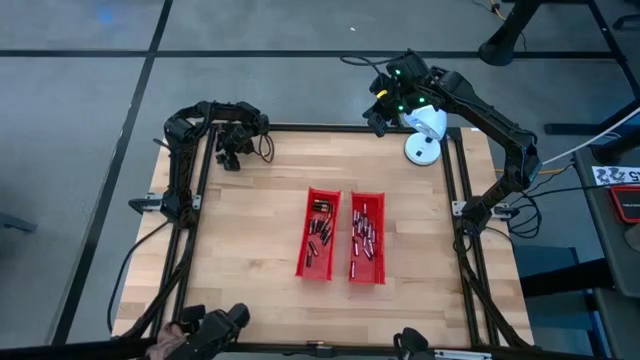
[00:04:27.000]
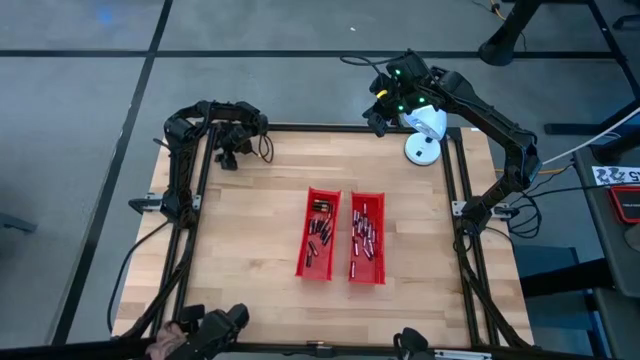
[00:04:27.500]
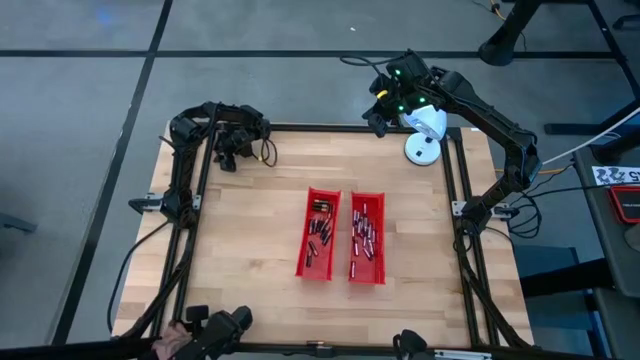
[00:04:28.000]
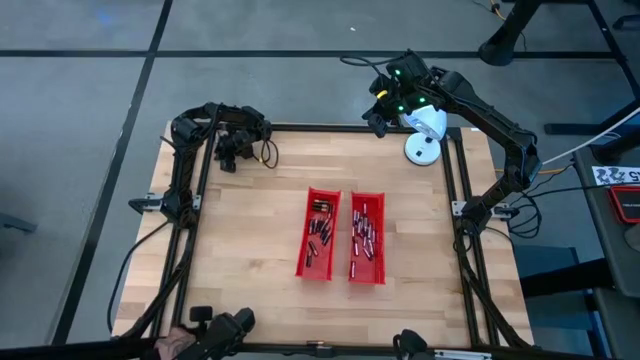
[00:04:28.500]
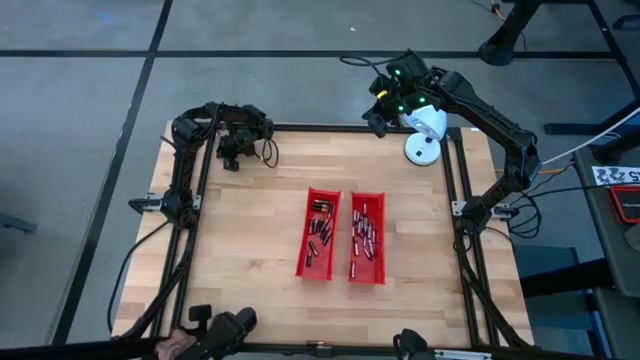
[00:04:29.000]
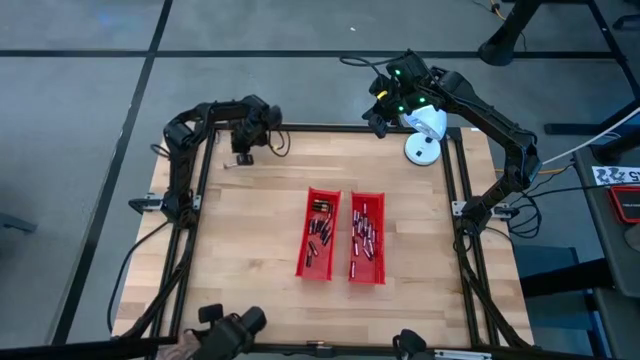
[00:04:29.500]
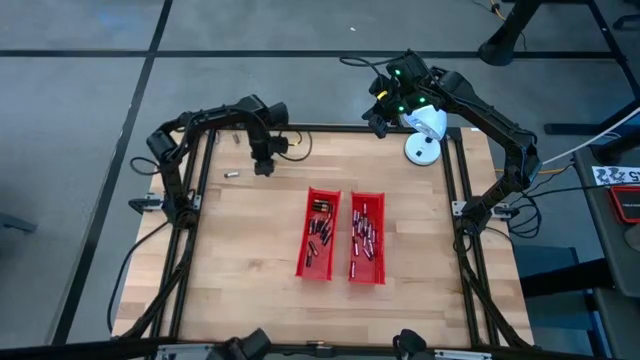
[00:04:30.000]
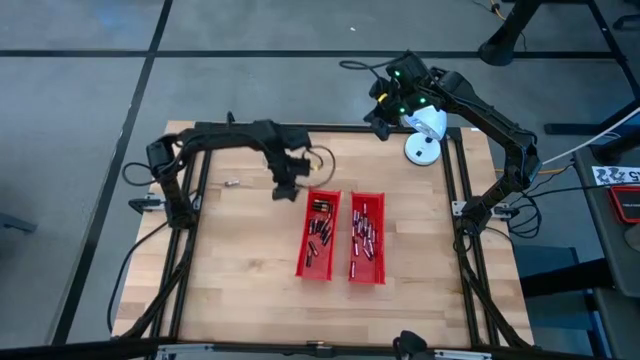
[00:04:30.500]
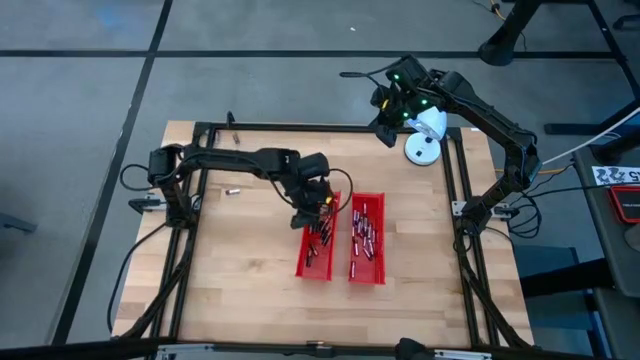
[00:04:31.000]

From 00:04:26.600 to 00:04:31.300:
Task: Sort batteries
Put the black battery into the left red bin

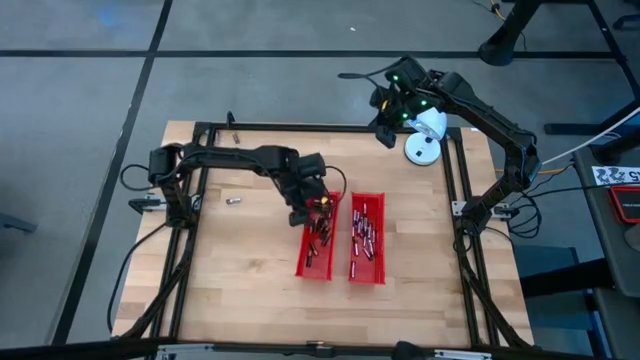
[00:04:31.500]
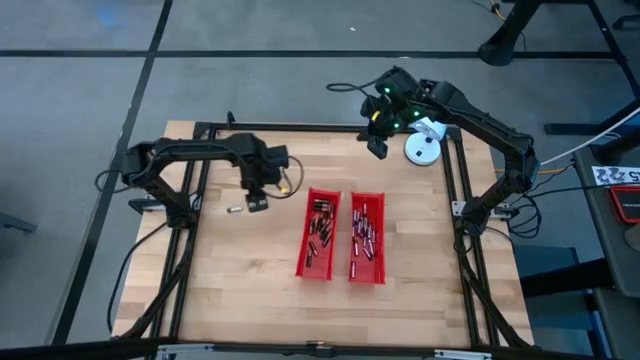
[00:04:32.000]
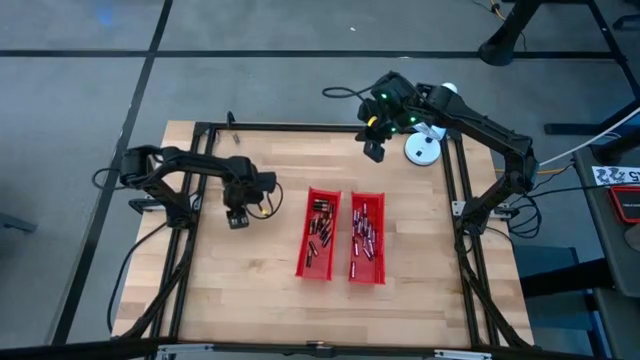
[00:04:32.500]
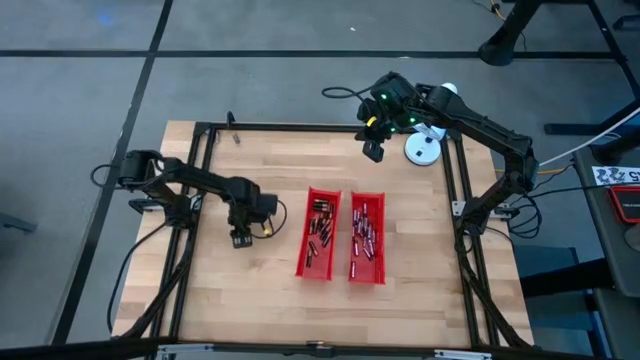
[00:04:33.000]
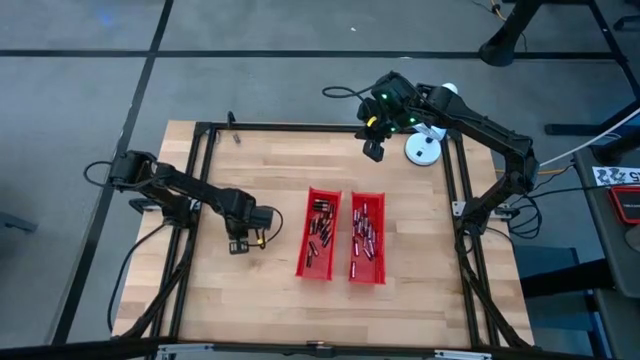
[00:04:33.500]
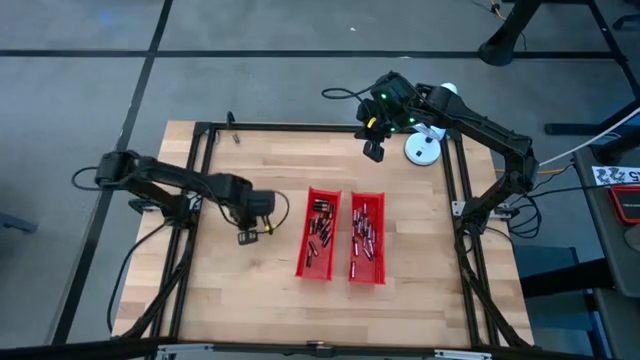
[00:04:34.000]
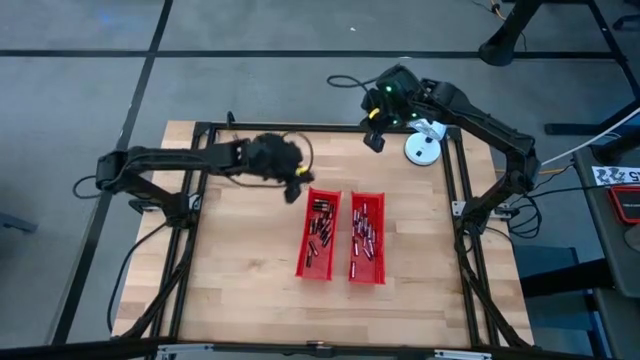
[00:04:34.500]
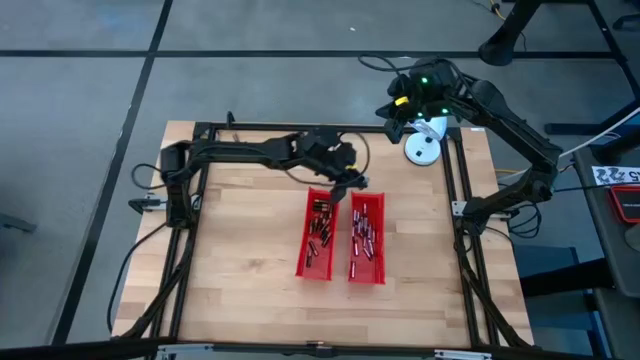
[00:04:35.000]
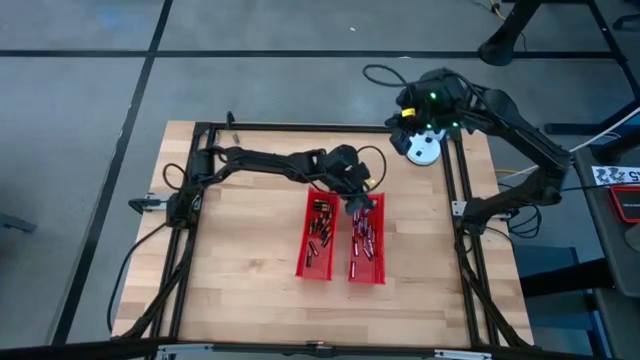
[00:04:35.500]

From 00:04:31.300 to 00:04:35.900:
Put the silver battery into the right red bin

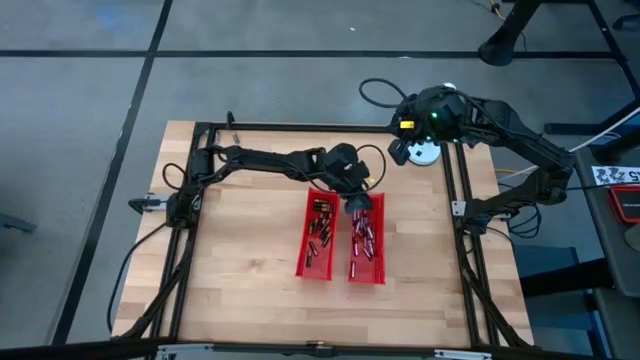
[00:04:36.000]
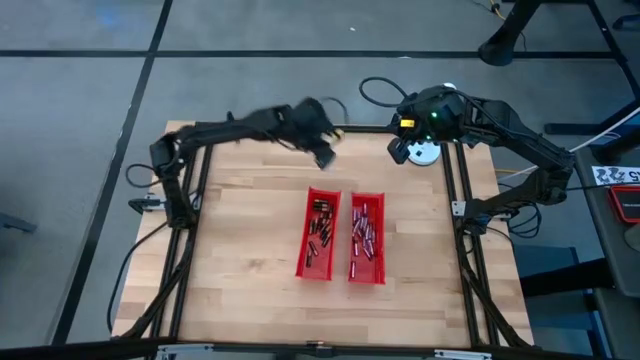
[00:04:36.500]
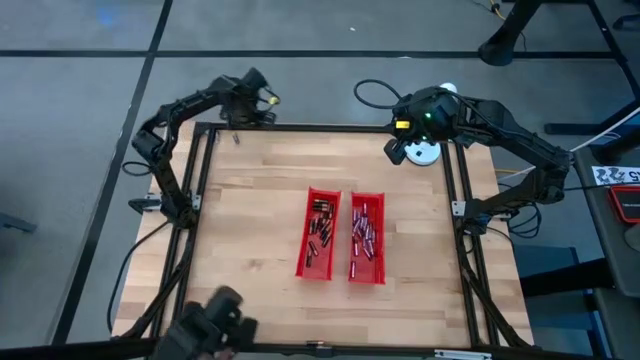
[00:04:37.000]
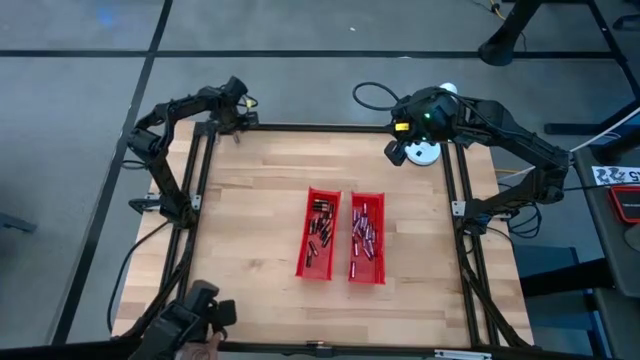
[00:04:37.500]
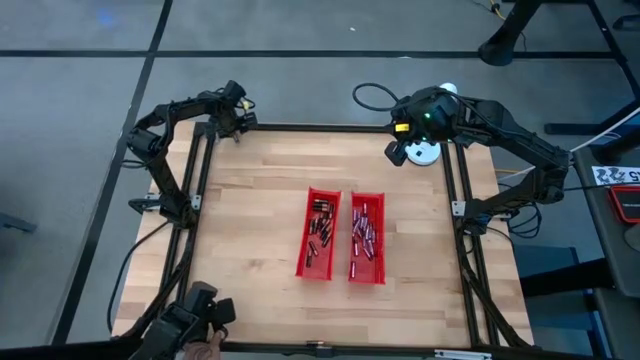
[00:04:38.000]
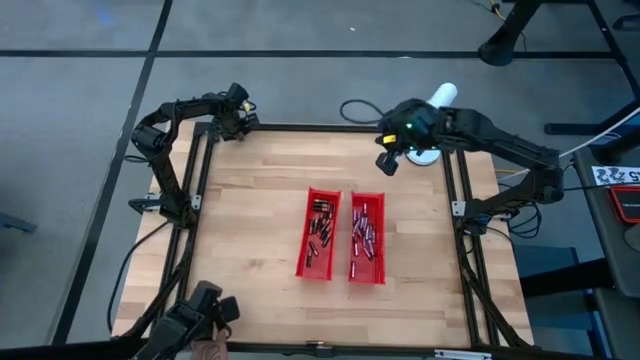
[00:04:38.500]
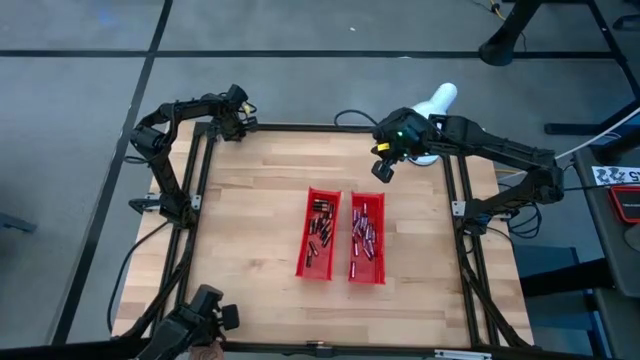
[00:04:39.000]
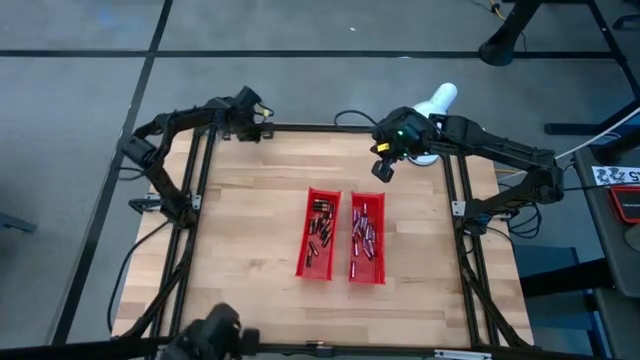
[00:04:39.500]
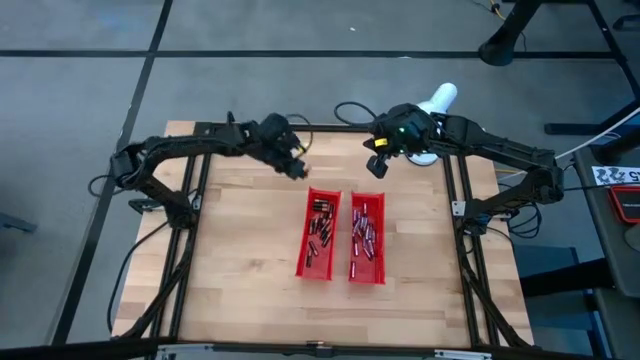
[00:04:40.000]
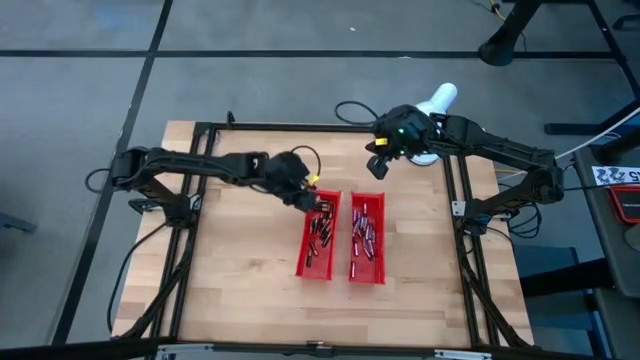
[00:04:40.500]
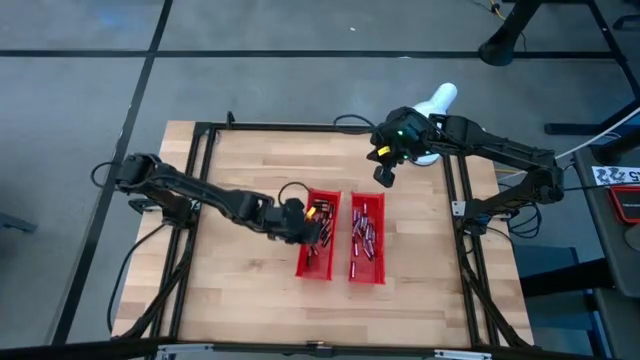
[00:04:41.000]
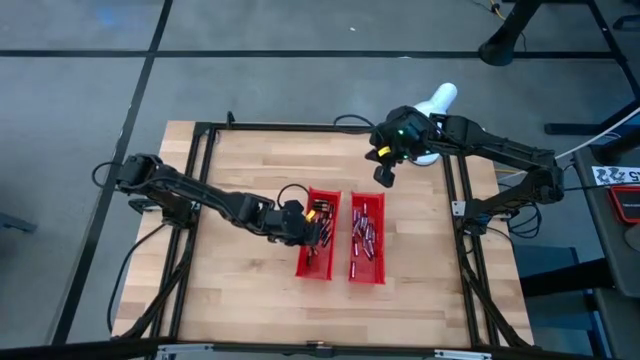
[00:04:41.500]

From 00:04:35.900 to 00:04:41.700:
Put the black battery into the left red bin

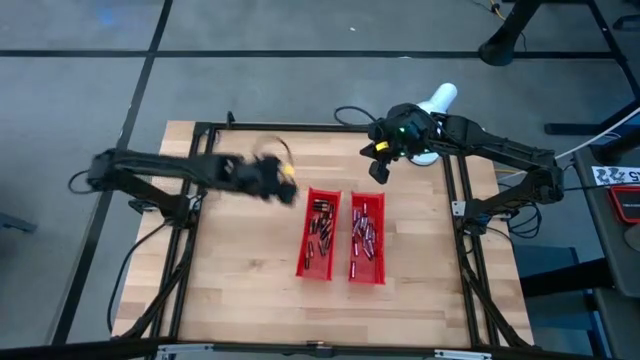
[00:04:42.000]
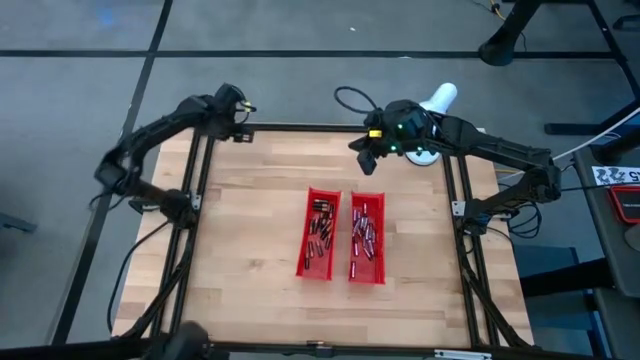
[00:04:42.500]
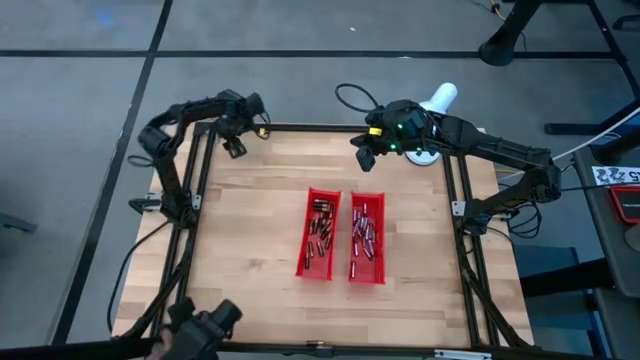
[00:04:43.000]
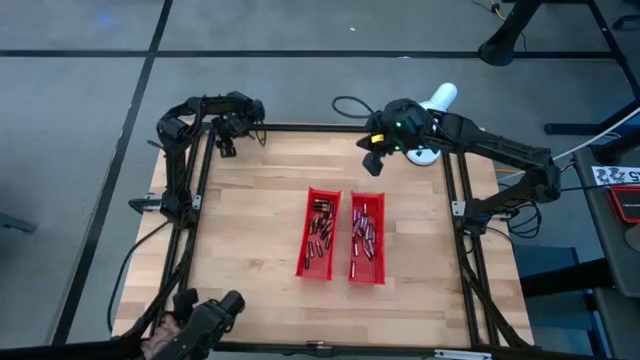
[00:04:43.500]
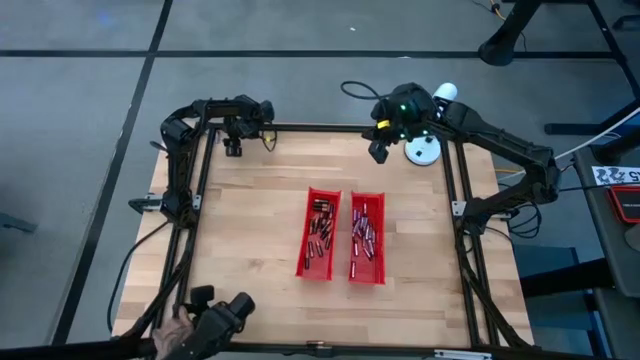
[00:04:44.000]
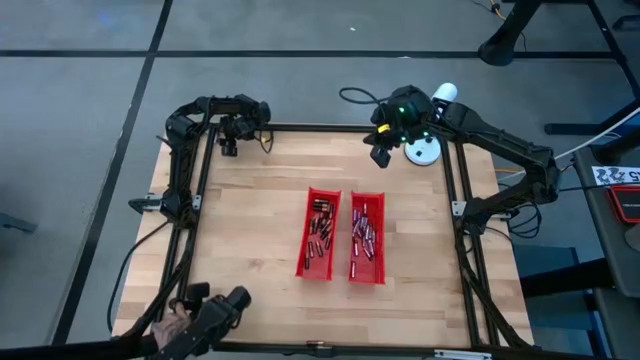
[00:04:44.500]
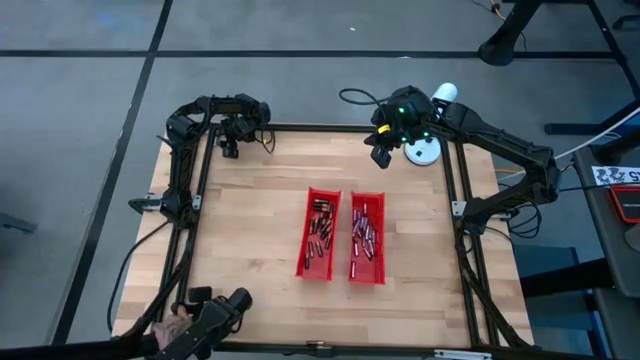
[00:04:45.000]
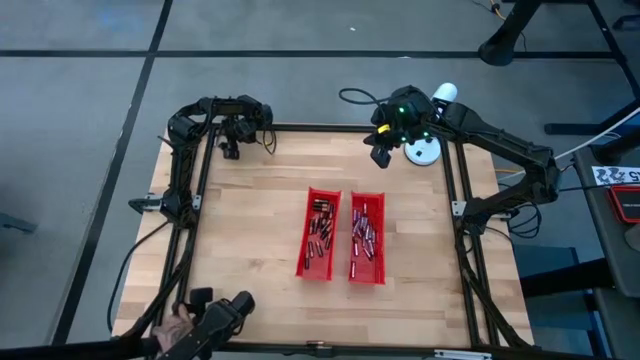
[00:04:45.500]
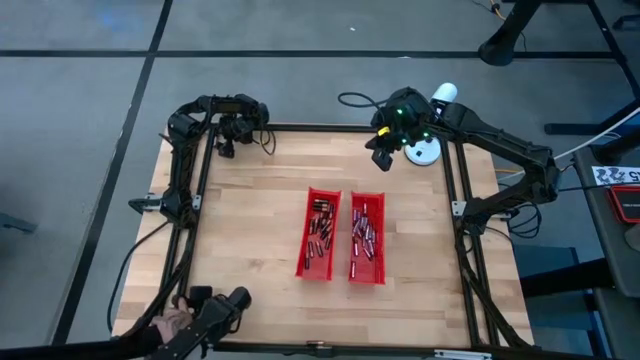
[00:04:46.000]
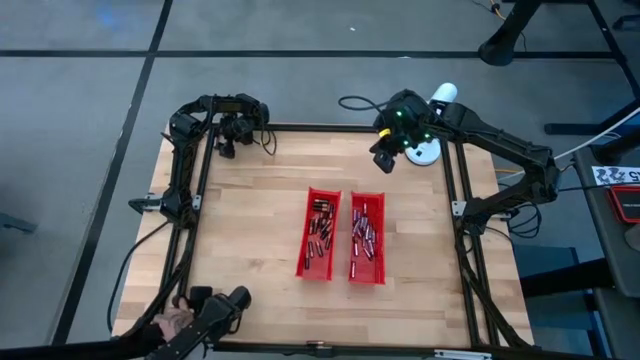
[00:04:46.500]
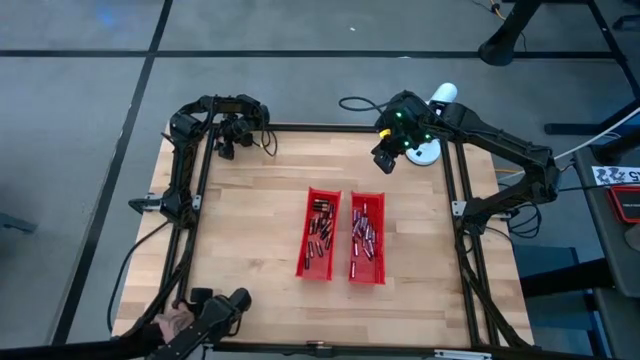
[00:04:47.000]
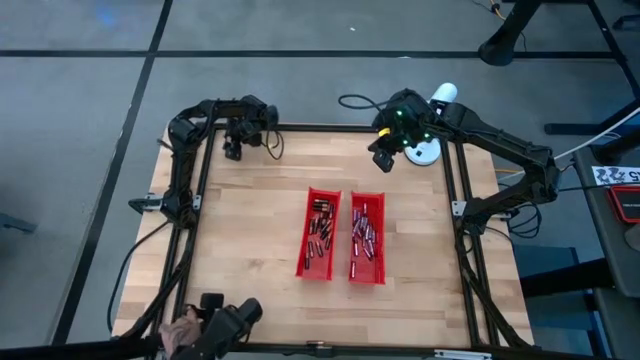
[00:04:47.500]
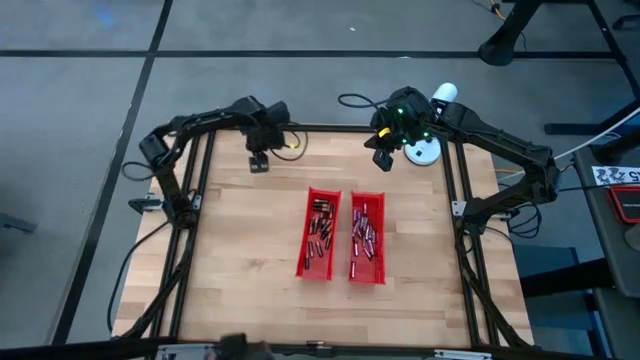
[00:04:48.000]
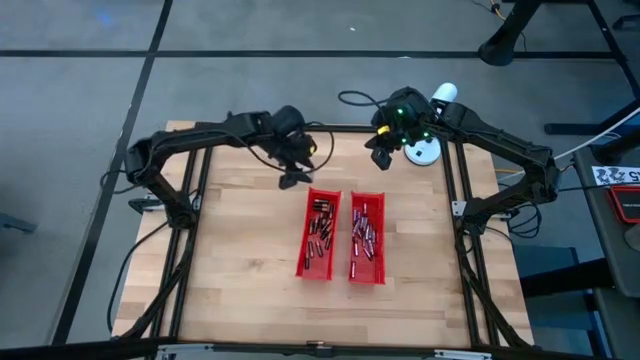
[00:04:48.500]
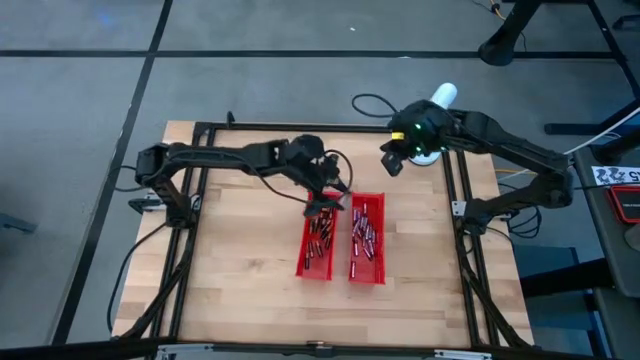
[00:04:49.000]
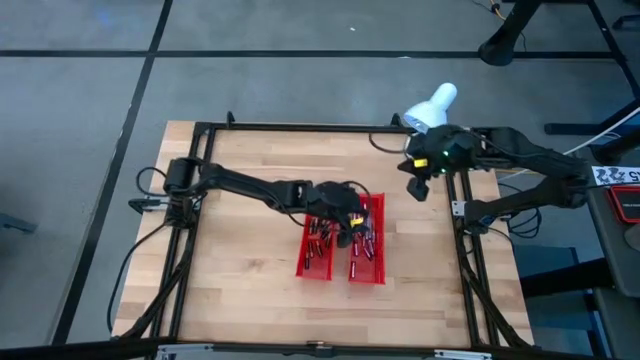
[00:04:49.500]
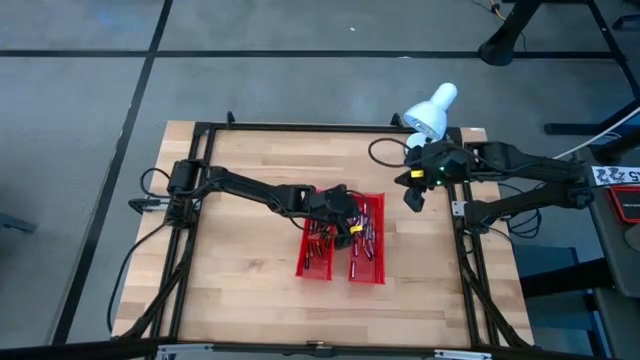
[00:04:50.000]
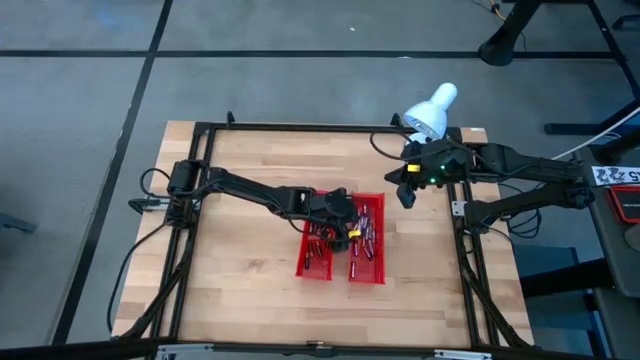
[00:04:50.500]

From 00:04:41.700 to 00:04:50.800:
Put the silver battery into the right red bin
